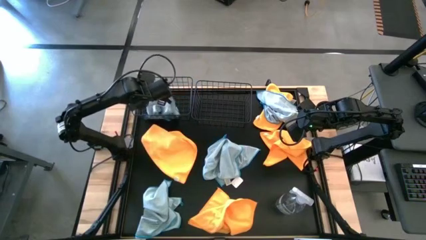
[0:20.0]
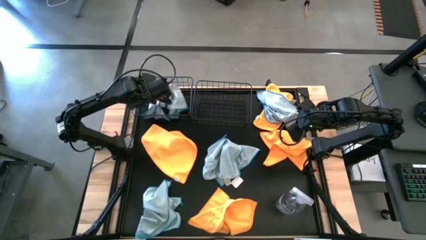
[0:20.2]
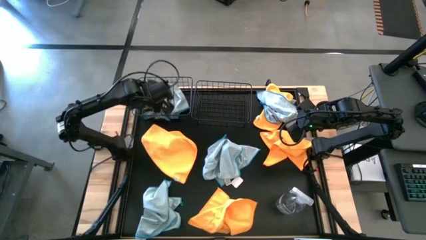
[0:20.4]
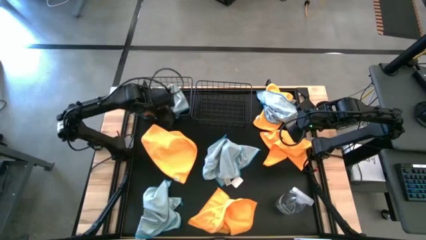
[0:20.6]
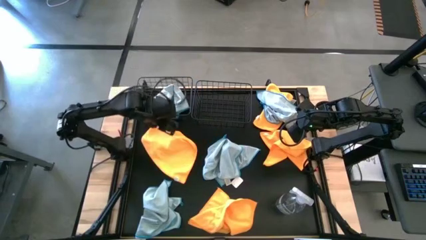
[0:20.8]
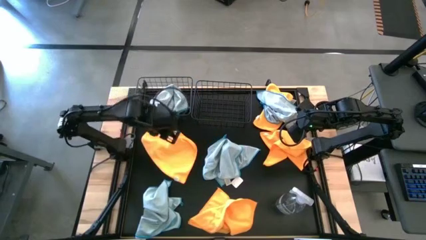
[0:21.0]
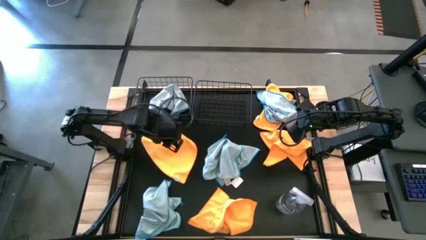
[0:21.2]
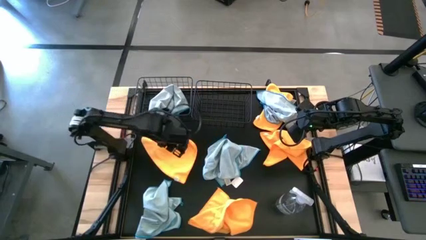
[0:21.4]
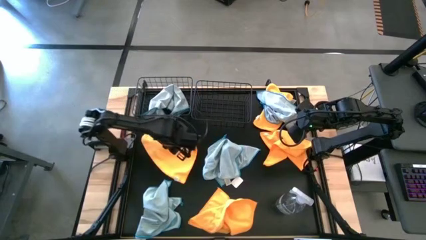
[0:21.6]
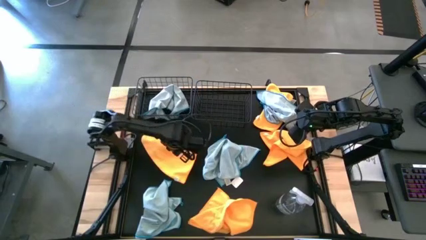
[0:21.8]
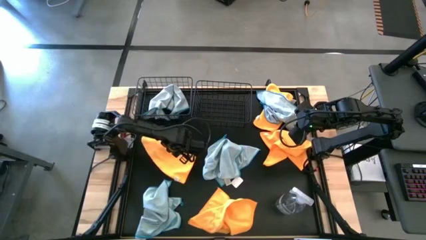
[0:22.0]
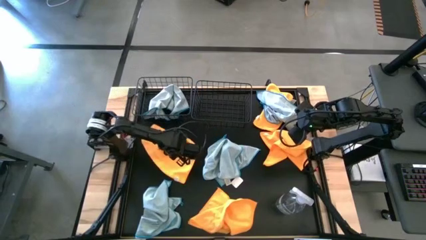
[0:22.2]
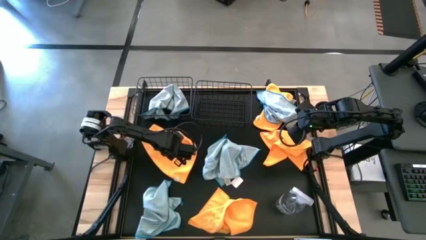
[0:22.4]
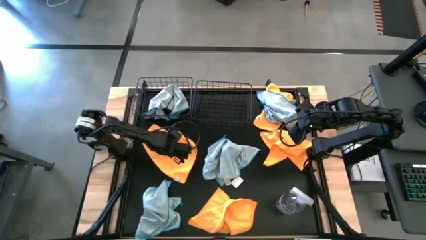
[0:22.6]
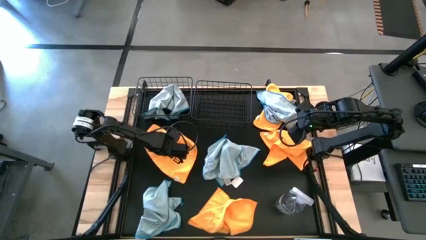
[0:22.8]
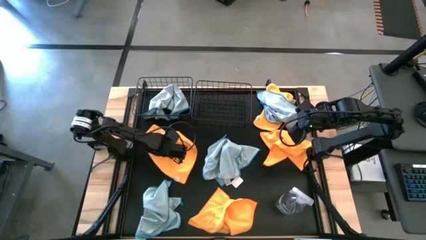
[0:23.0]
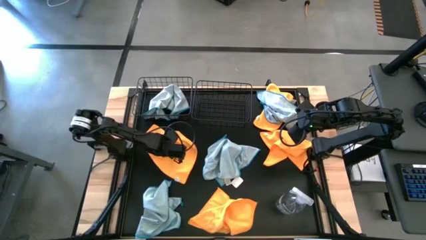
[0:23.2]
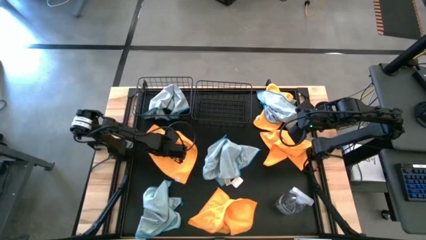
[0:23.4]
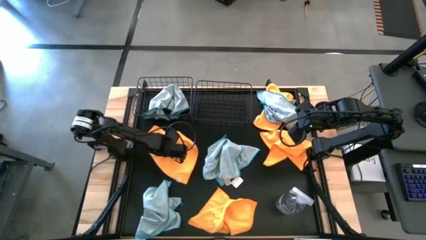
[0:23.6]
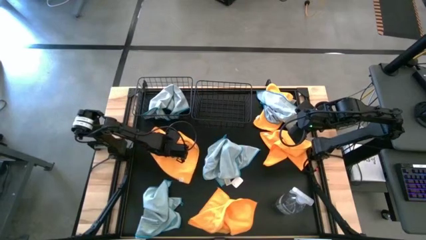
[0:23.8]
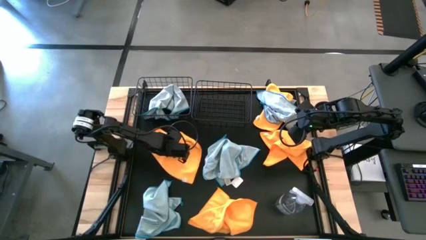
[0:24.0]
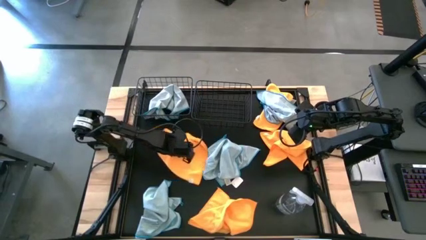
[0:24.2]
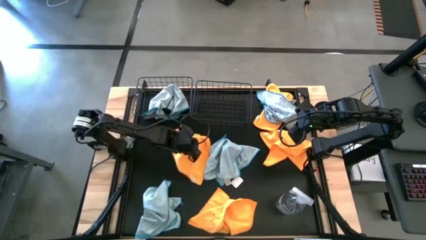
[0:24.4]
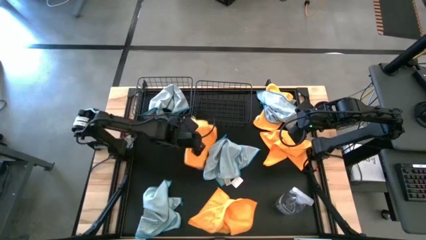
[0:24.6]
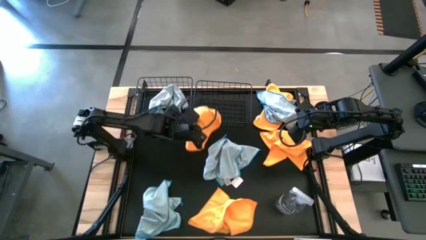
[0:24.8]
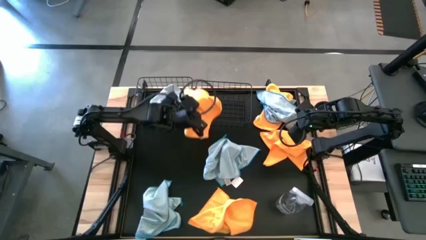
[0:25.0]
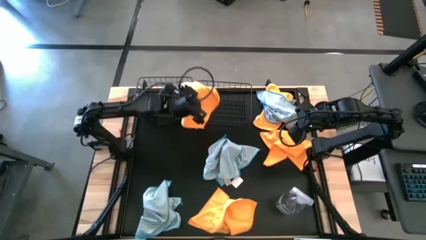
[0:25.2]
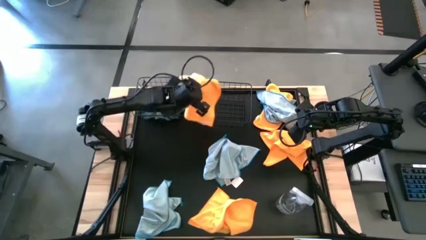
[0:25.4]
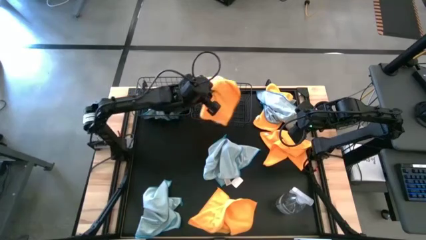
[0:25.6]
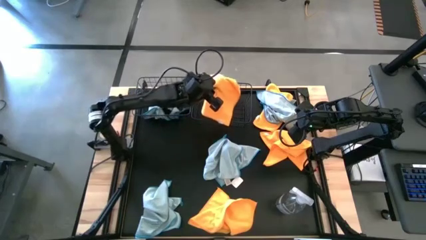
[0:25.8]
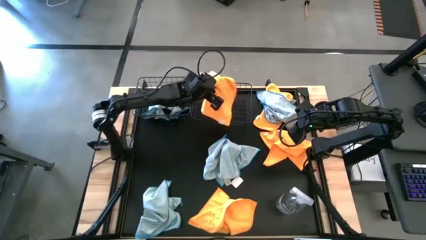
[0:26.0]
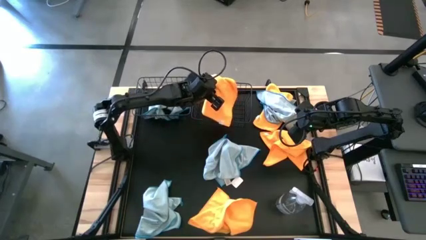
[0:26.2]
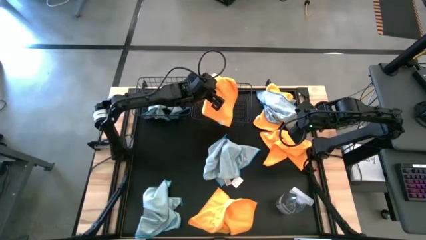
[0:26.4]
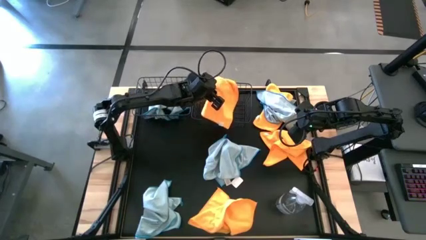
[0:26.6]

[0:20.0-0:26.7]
Task: Sort microfiber towel by color & place in baskets
Put the yellow towel into the right black wire basket

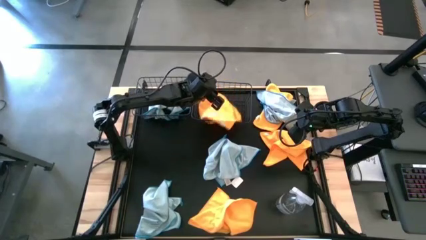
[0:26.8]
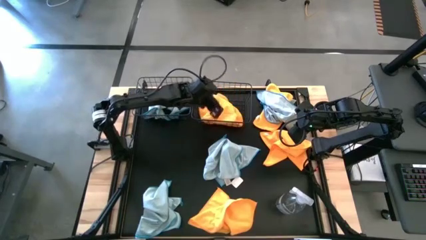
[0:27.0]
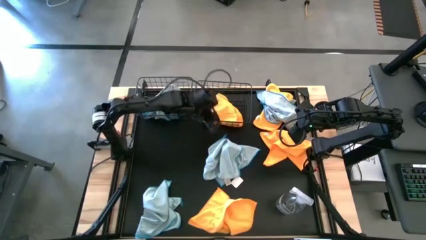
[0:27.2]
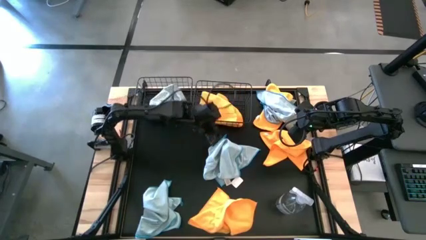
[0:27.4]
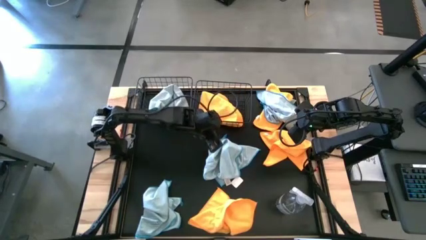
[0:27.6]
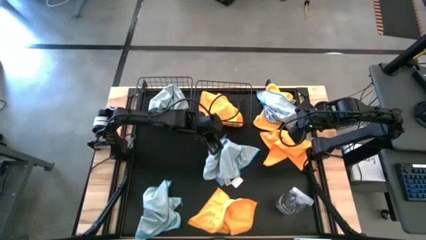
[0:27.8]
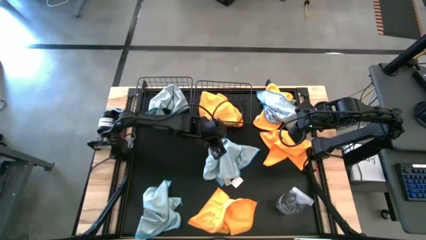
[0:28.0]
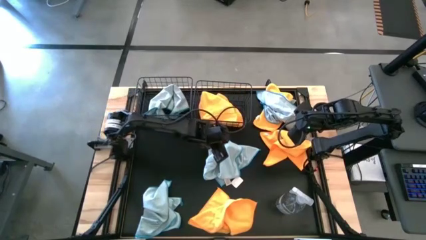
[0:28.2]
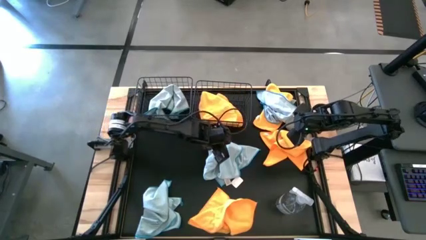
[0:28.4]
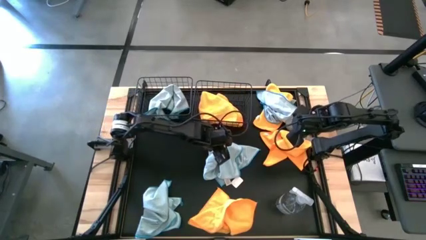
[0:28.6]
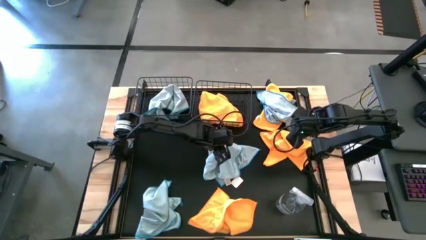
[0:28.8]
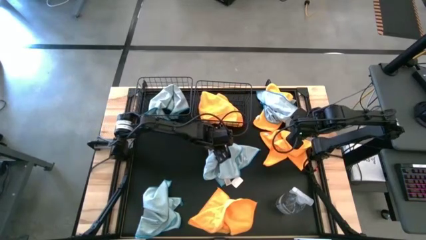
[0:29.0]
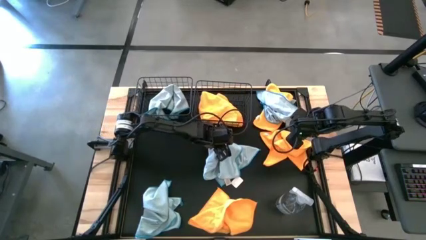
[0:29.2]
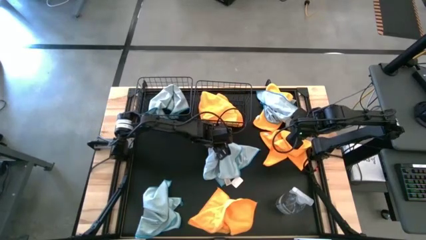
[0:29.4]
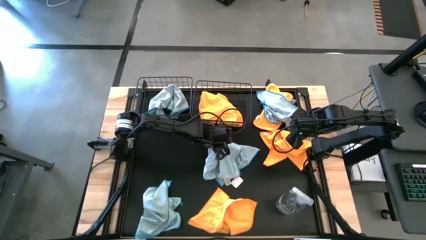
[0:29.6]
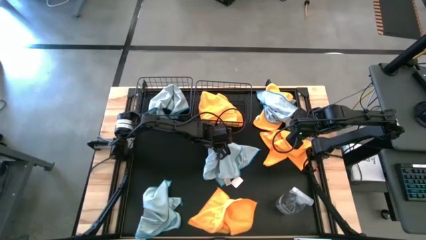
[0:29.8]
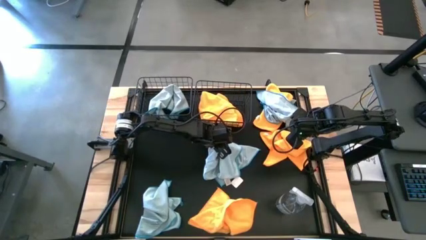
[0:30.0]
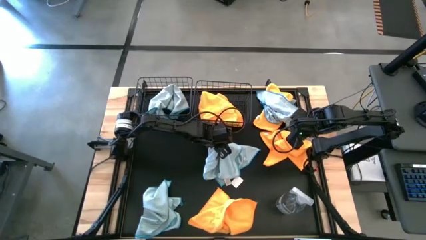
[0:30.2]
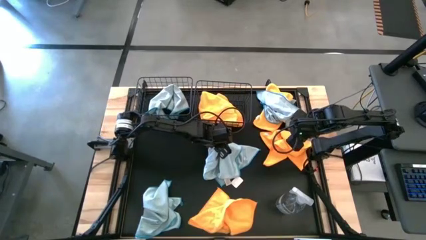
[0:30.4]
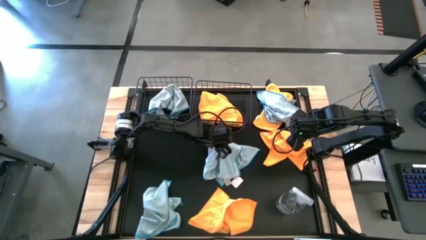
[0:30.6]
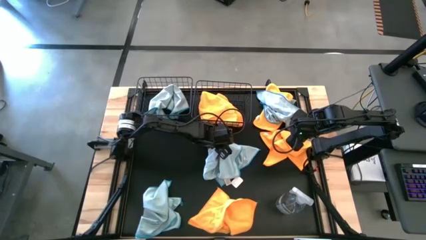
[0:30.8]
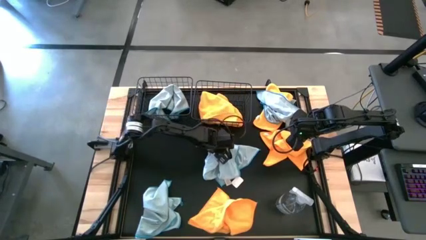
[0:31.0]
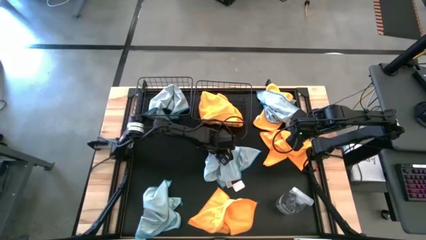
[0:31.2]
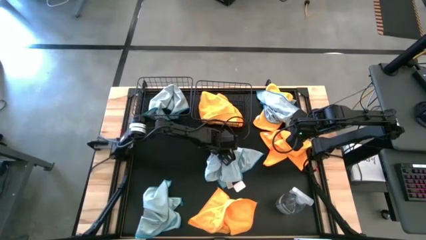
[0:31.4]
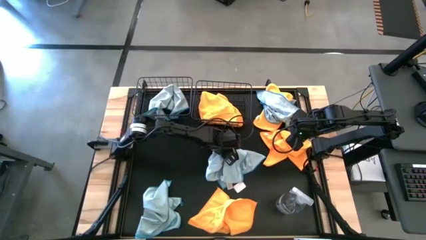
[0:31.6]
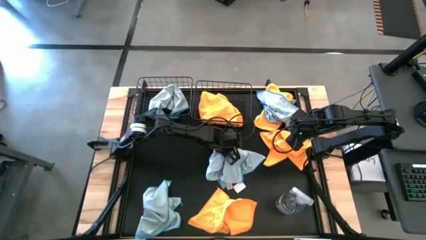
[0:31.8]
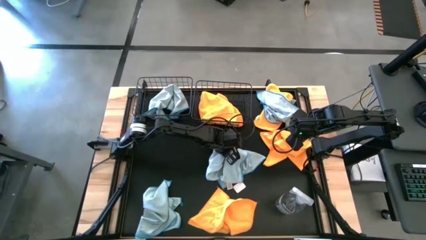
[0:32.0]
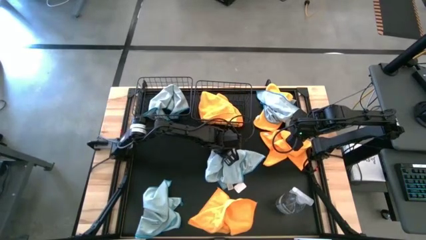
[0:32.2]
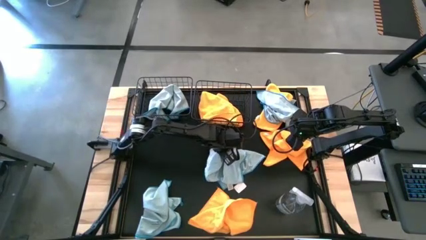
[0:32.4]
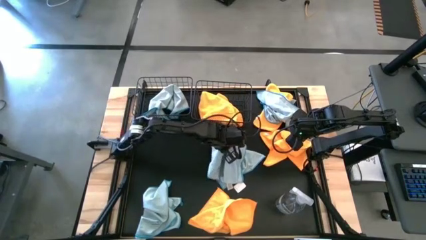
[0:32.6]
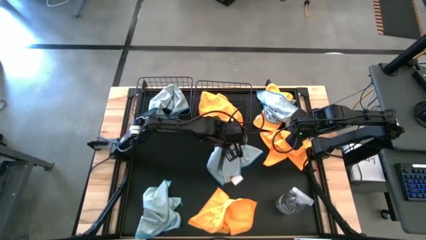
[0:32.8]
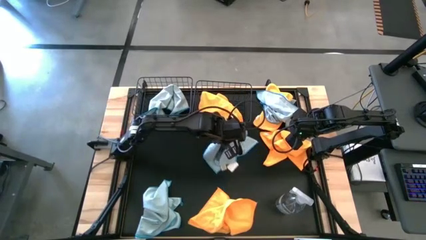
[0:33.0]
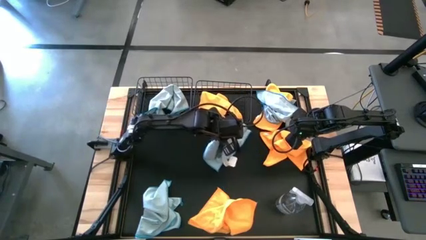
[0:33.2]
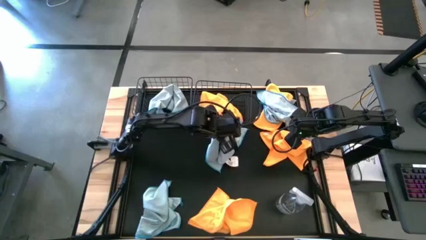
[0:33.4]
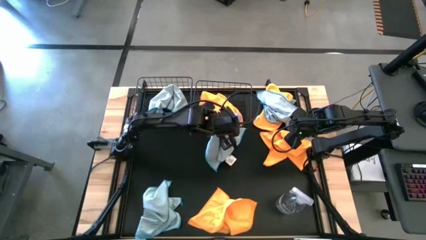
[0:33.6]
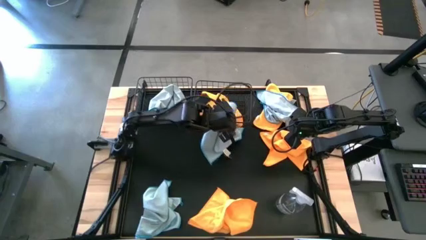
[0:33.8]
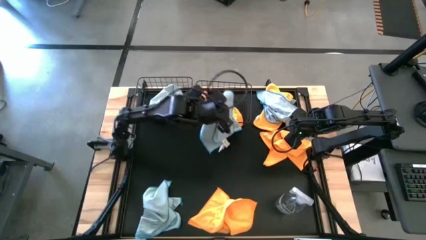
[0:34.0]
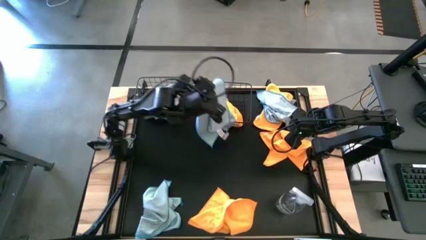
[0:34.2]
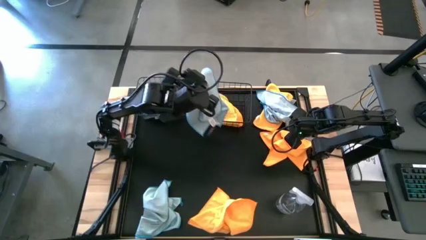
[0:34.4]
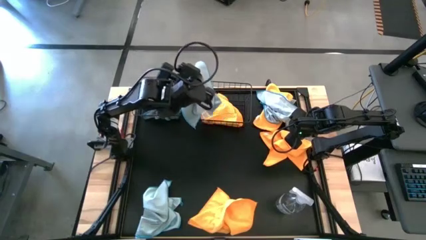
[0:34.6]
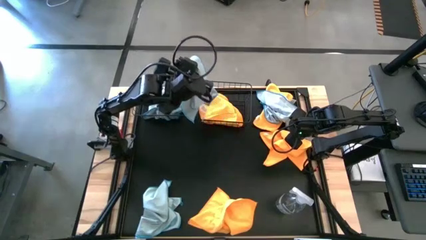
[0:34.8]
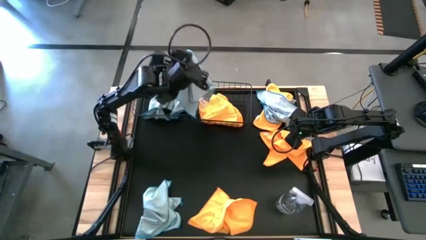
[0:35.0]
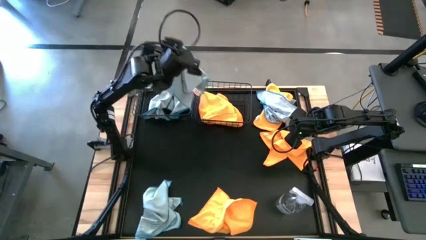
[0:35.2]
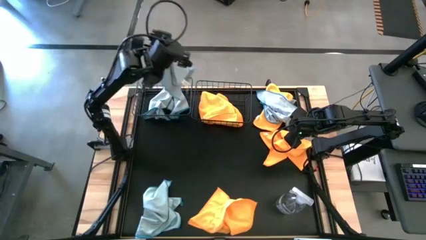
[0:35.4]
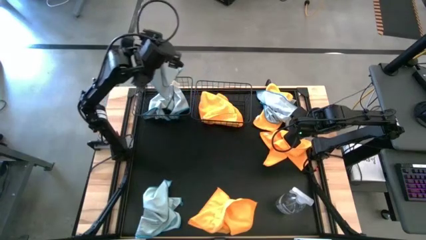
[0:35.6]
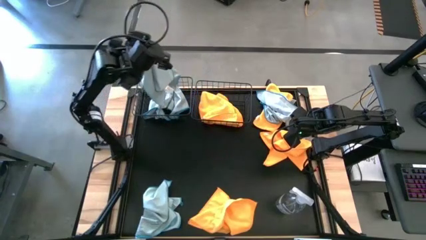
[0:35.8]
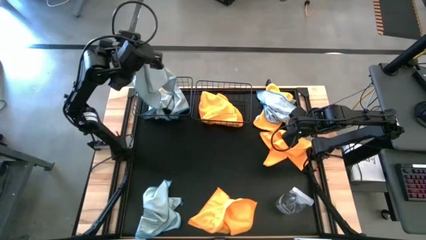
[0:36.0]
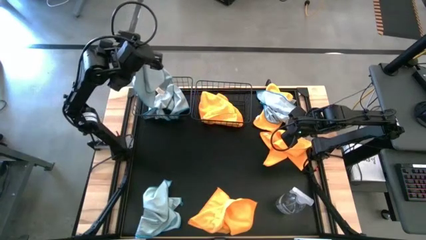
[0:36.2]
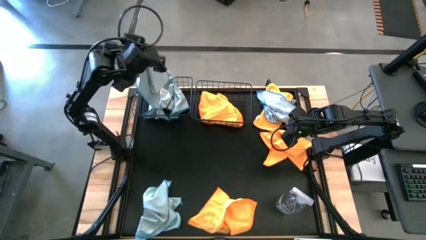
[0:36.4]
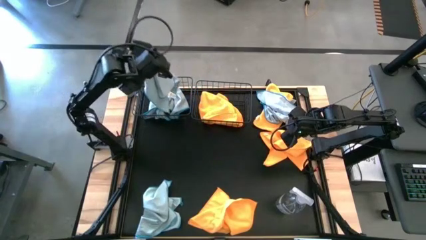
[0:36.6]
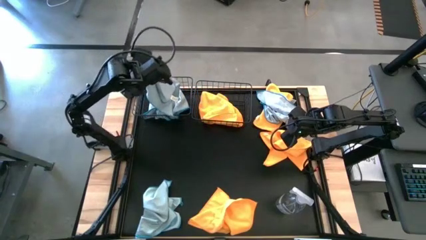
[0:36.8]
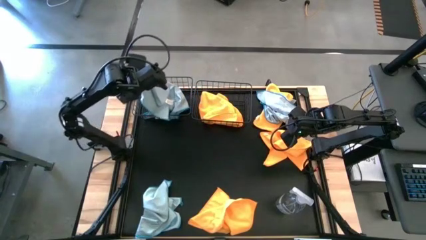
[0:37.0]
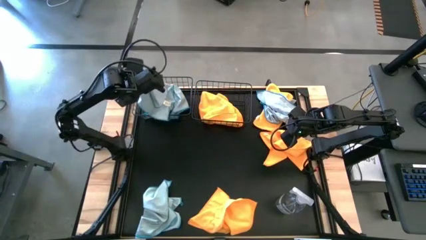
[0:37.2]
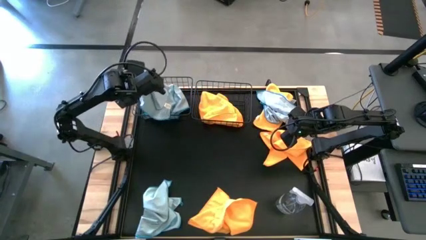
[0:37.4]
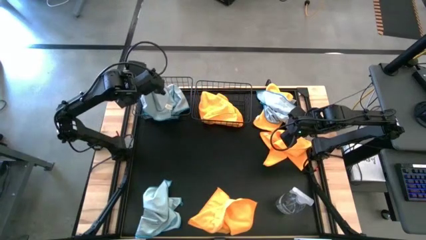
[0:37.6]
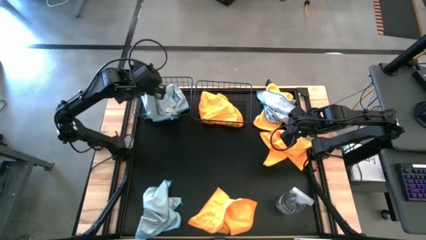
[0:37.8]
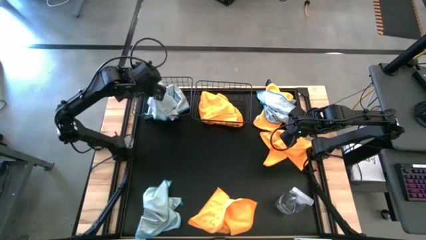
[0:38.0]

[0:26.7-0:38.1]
Put the blue towel into the left black wire basket
